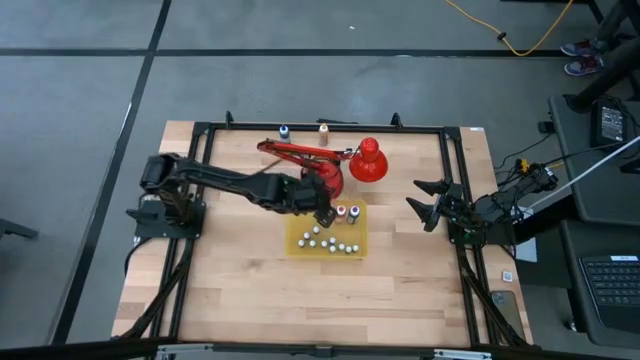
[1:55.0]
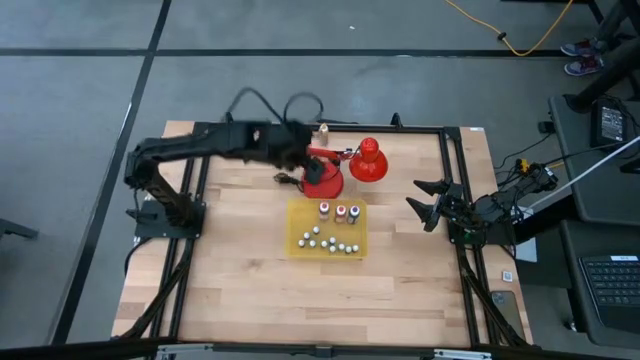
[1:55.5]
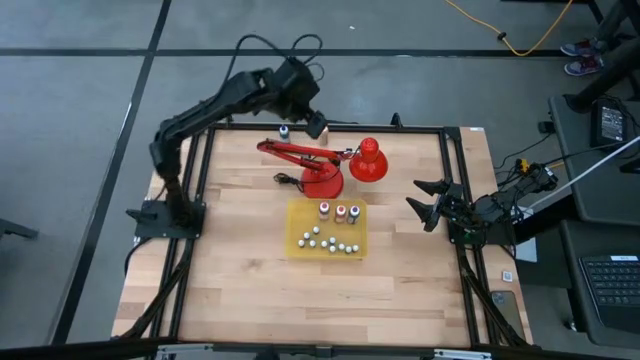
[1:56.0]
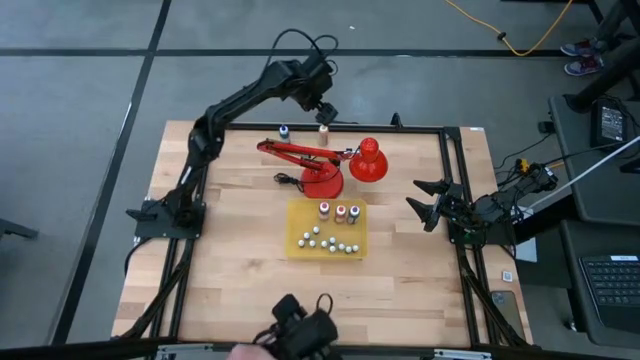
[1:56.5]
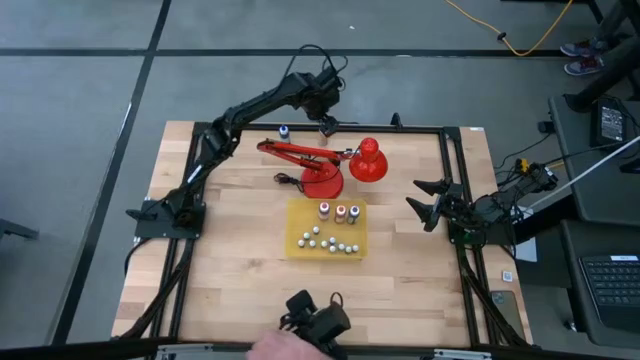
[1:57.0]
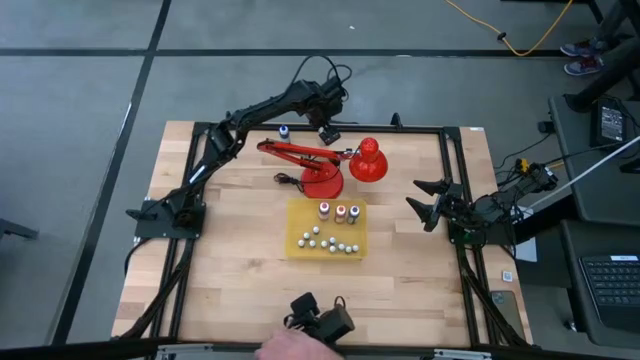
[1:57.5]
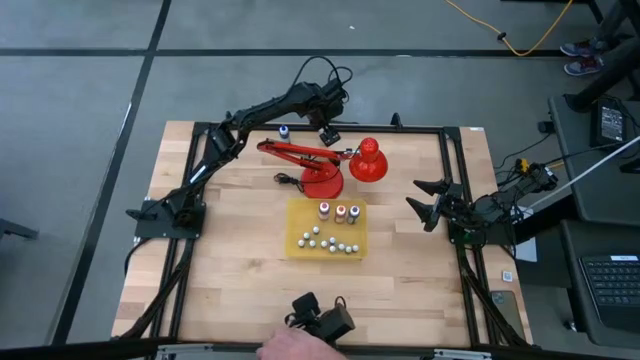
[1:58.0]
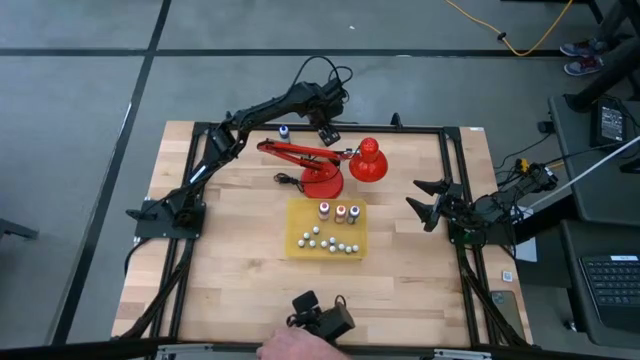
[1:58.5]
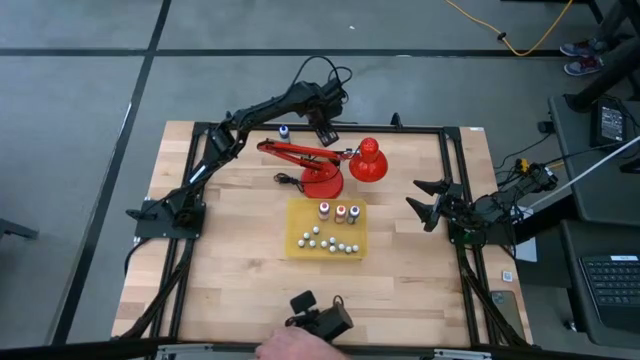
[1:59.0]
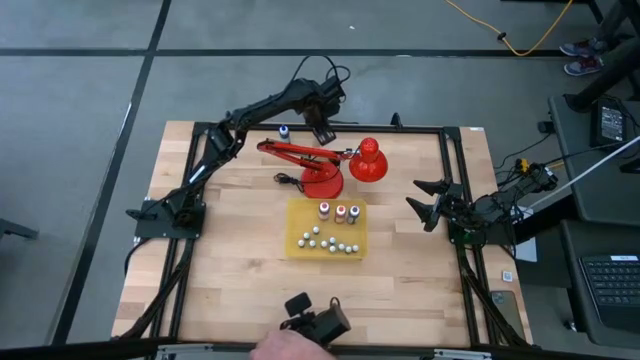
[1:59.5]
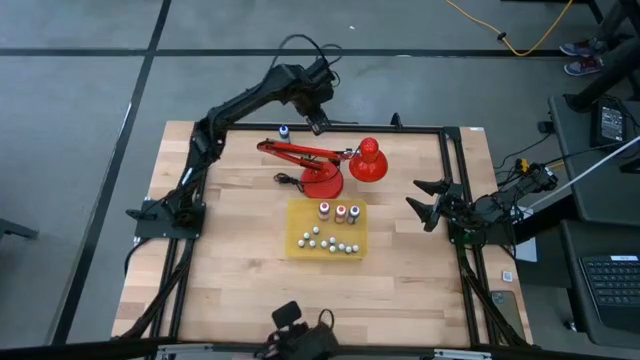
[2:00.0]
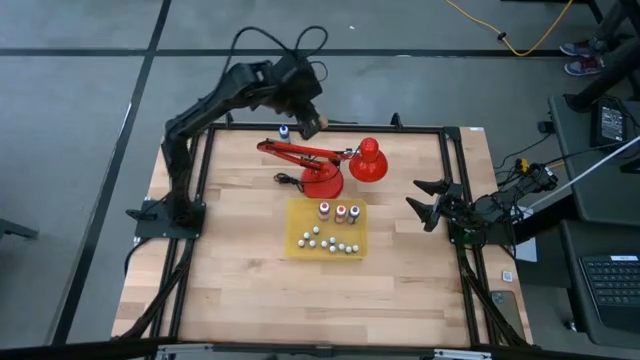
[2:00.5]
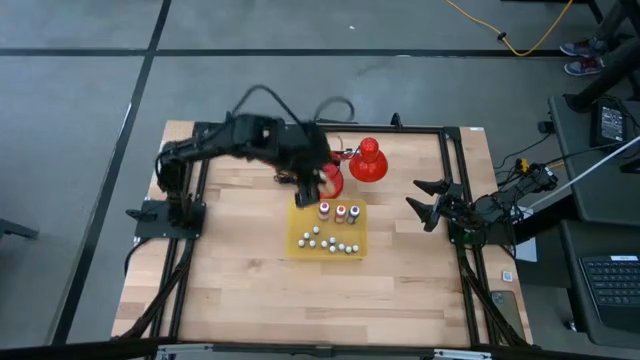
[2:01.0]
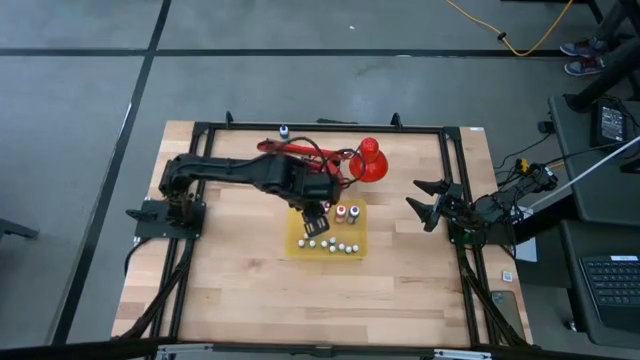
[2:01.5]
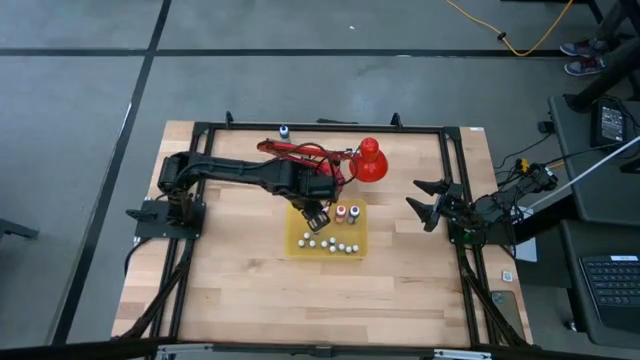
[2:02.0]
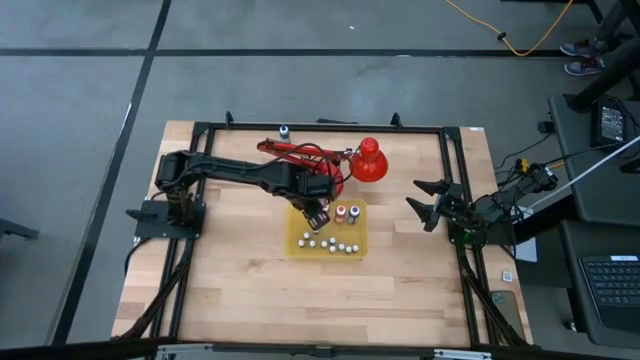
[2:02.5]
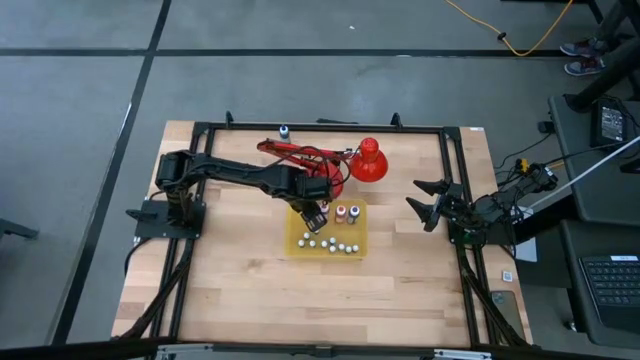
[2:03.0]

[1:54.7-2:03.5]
Task: Pick & Place food coloring
Put the big yellow food bottle into the yellow bin

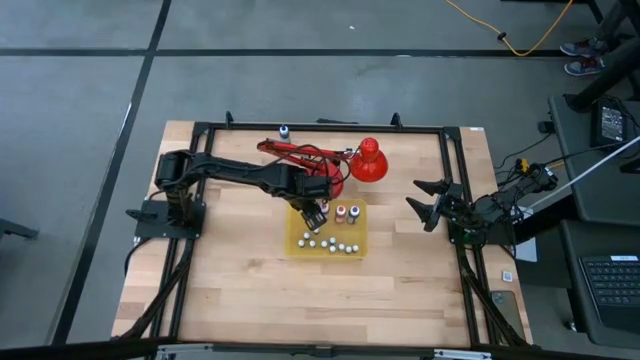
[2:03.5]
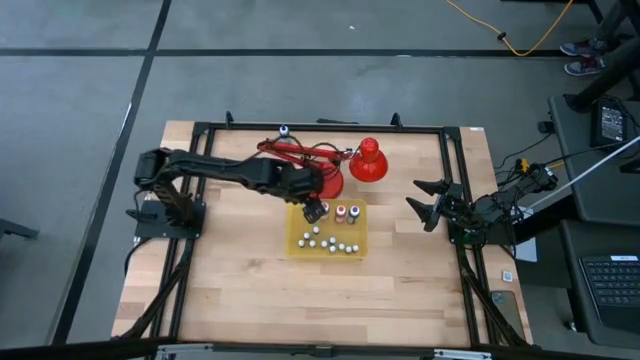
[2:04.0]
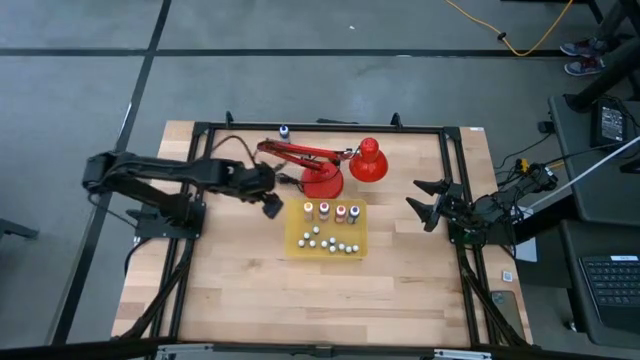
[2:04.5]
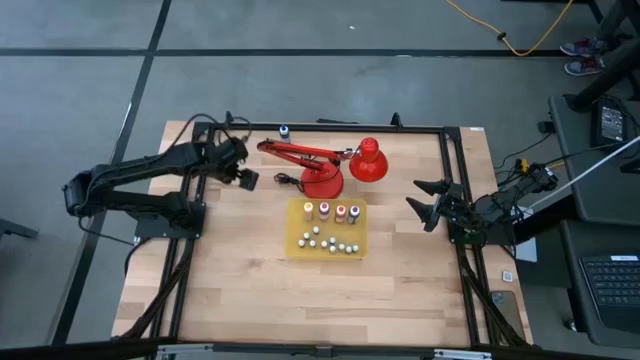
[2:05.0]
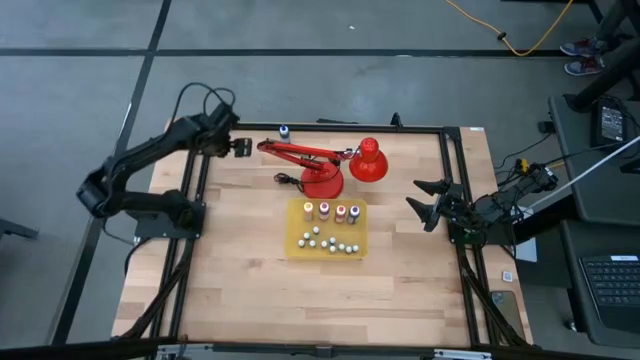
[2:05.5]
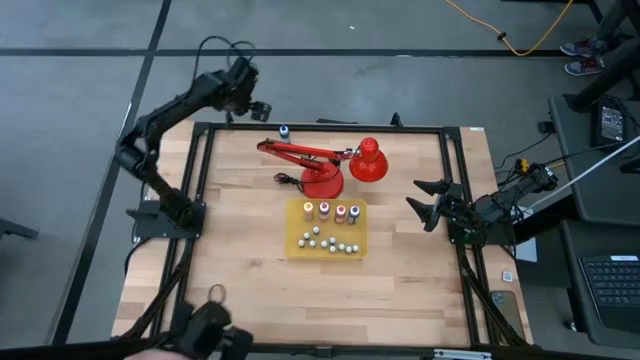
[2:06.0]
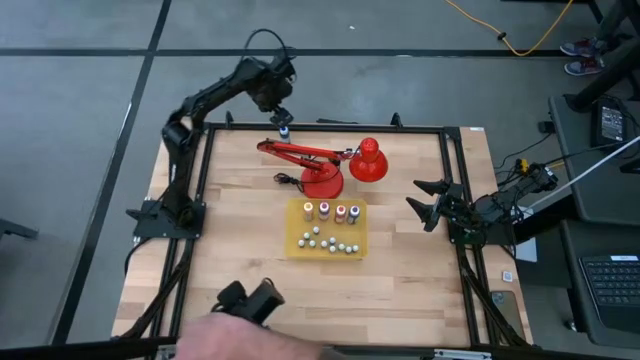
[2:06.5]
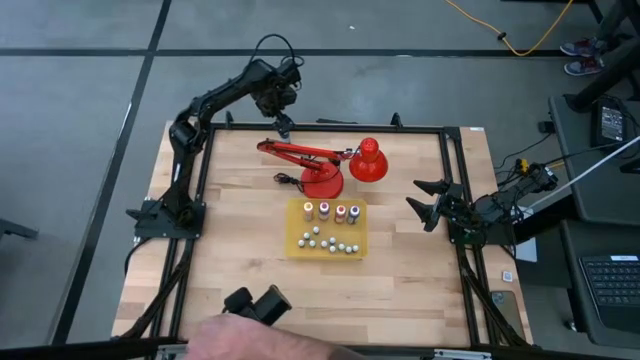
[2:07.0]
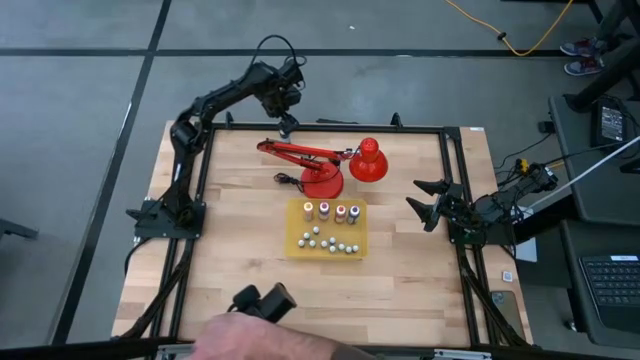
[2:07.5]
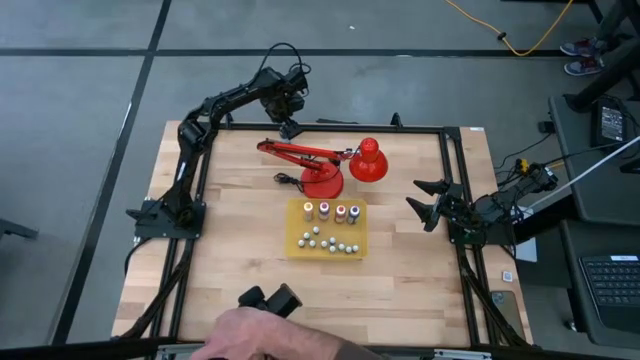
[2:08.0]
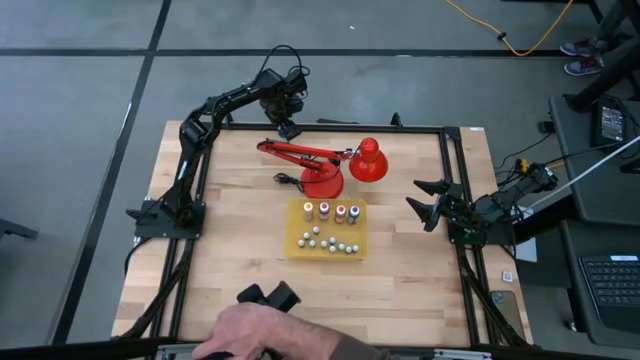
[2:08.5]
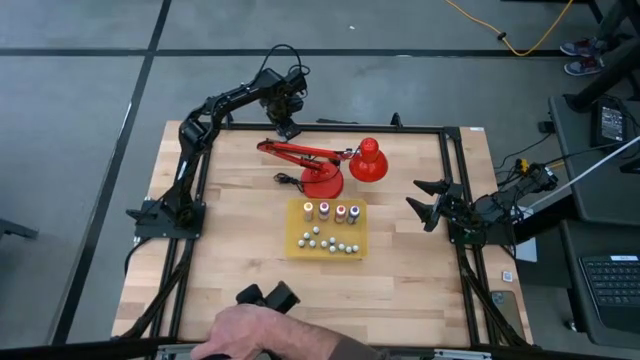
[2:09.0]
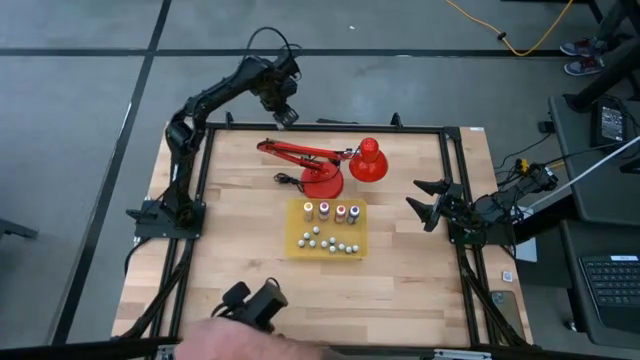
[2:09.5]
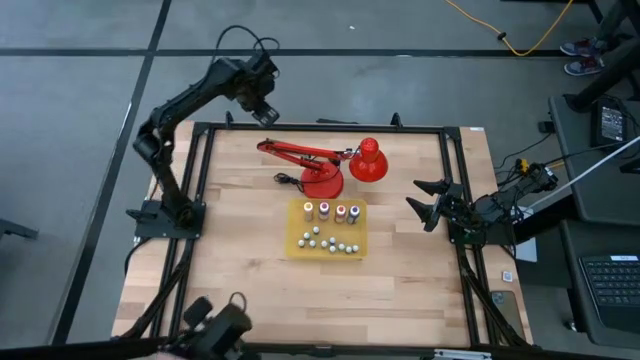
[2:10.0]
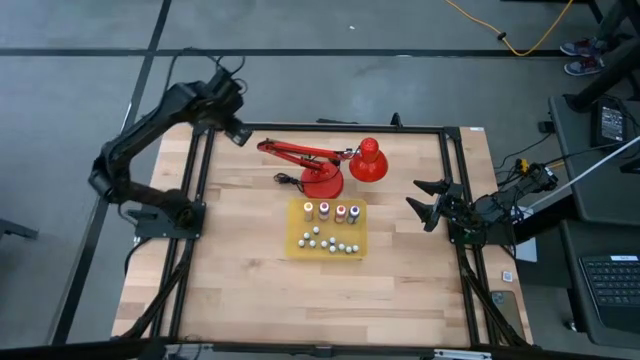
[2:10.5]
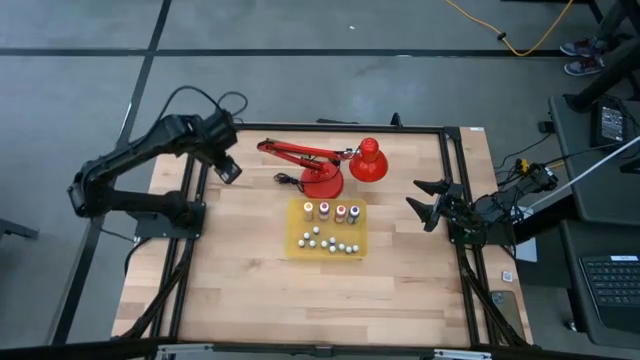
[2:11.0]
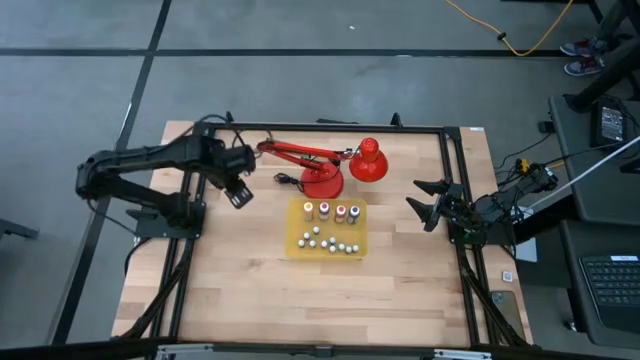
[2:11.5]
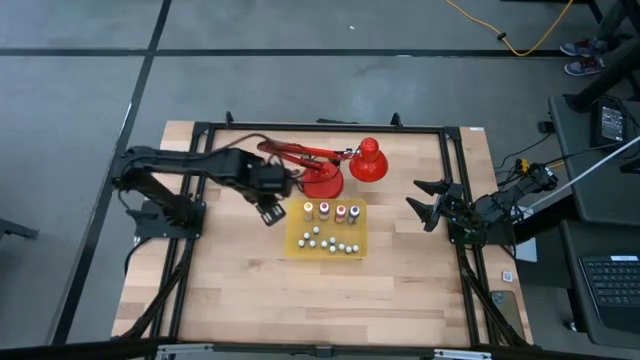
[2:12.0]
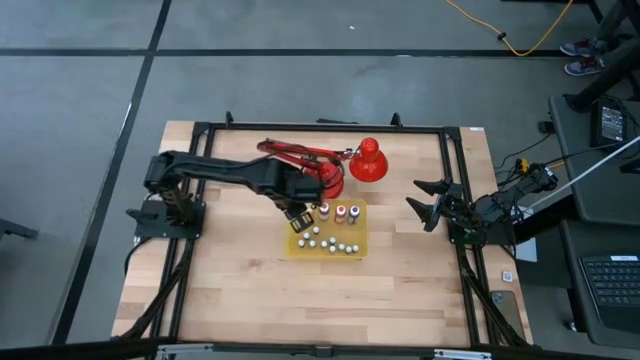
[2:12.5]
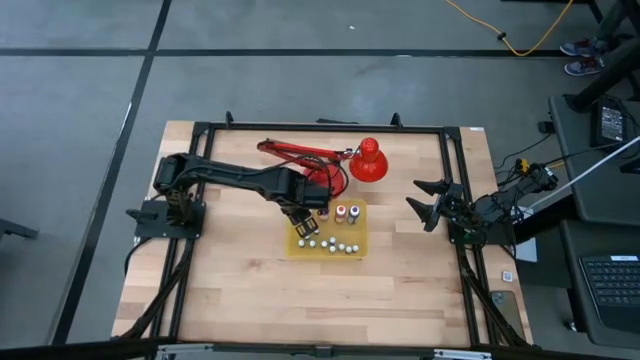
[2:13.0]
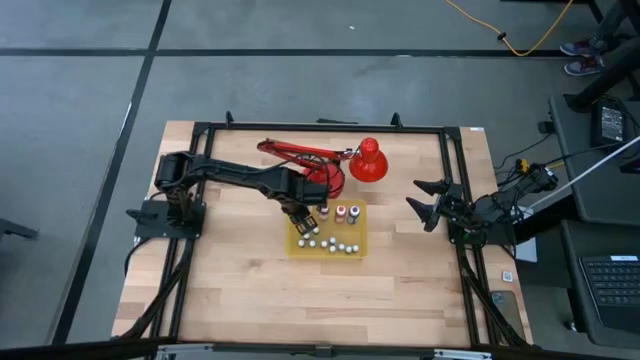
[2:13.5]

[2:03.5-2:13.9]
Put the big blue food bottle into the yellow bin

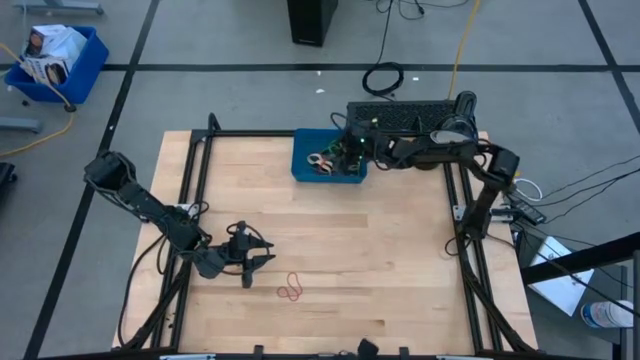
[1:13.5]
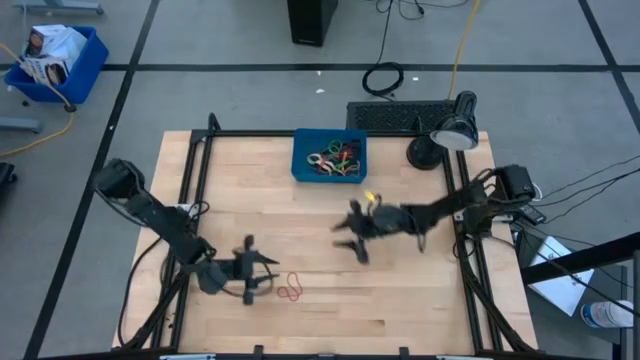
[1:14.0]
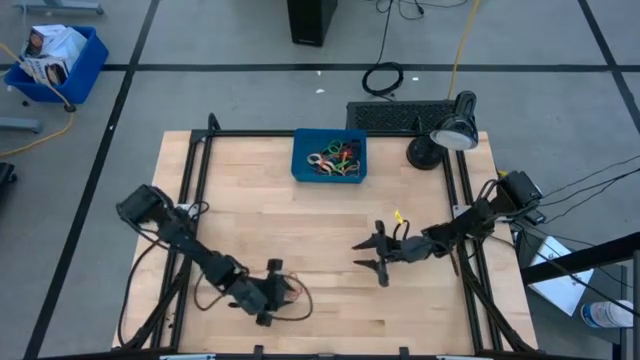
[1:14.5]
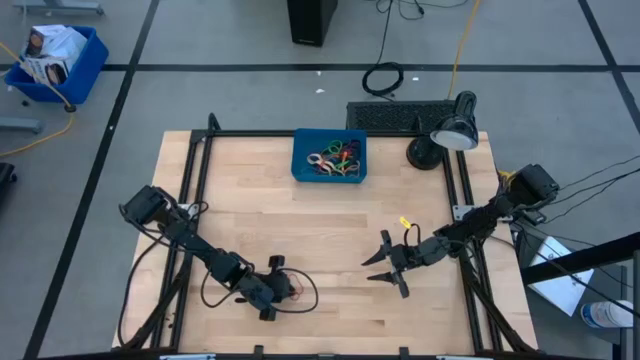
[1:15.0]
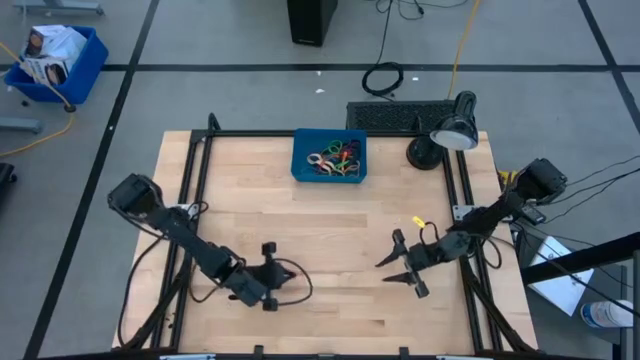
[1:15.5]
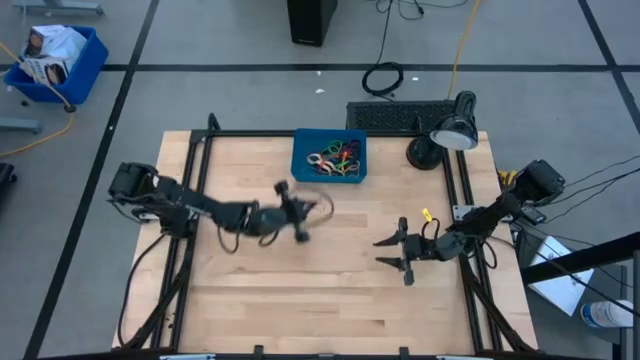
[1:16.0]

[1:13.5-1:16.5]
Task: Pick and place rubber bands into bin
Put the red rubber band into the blue bin
